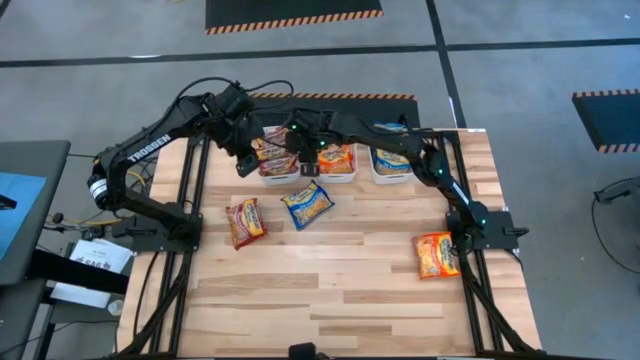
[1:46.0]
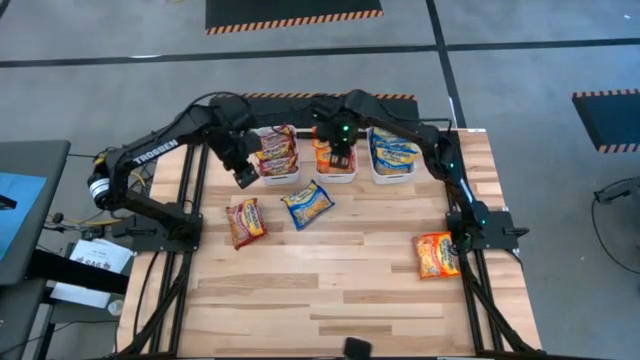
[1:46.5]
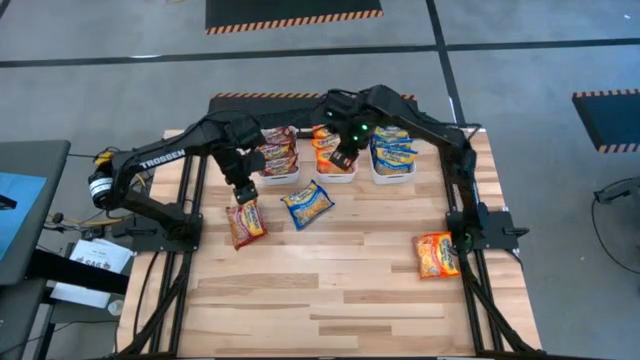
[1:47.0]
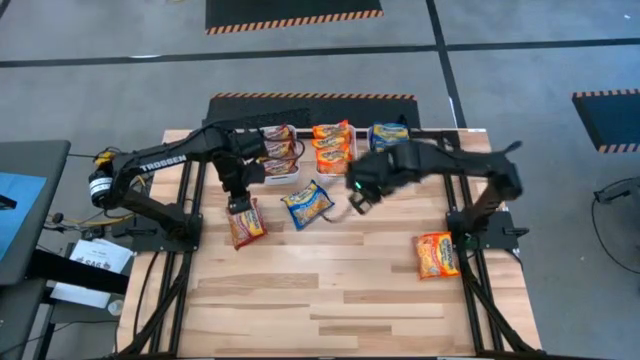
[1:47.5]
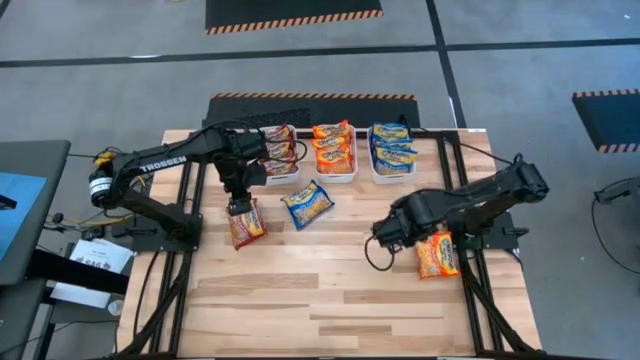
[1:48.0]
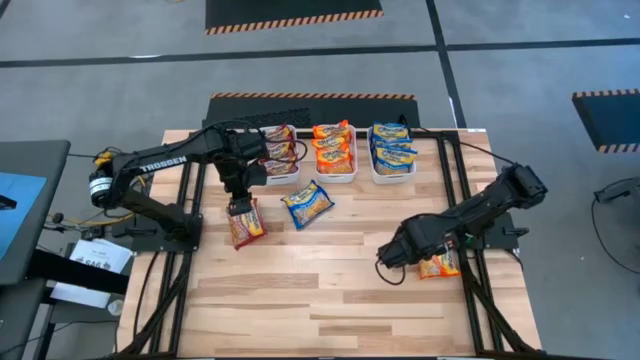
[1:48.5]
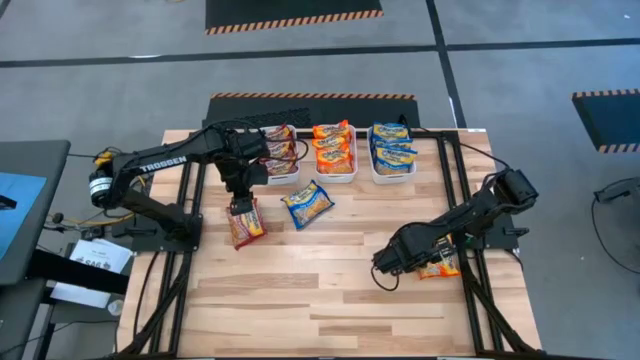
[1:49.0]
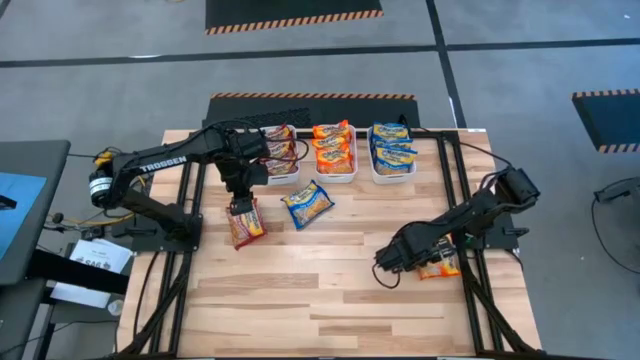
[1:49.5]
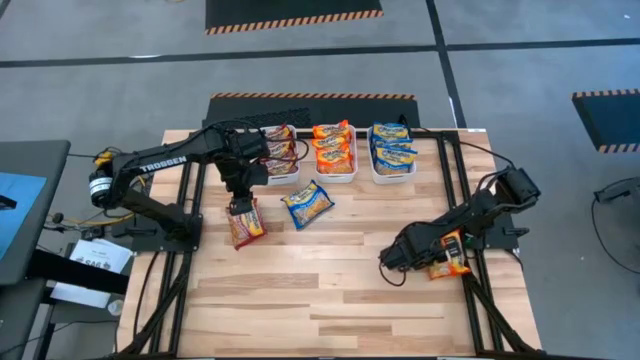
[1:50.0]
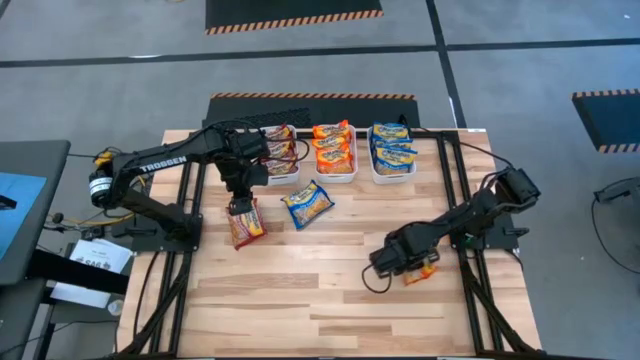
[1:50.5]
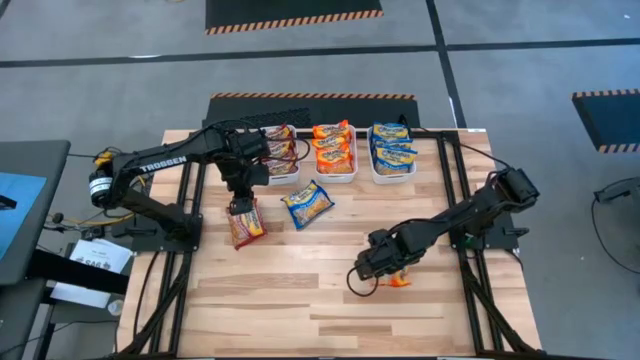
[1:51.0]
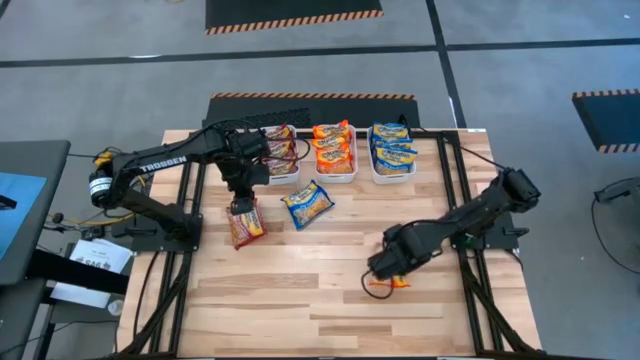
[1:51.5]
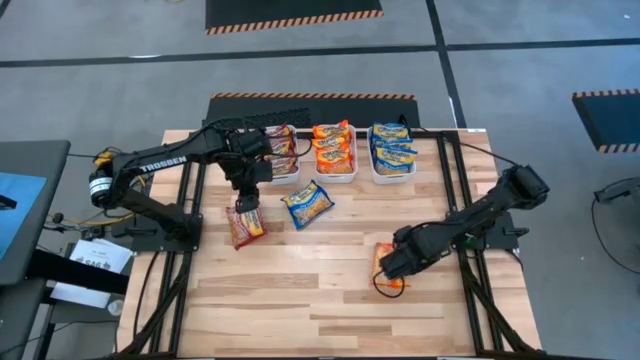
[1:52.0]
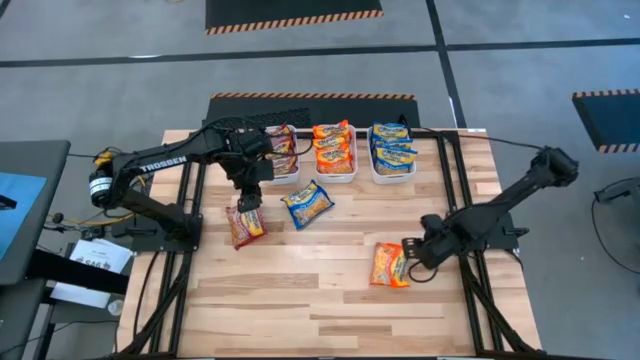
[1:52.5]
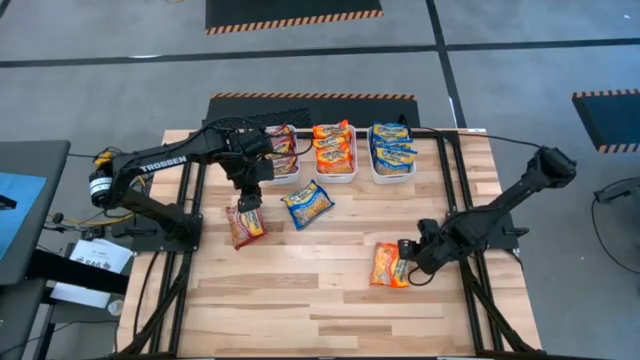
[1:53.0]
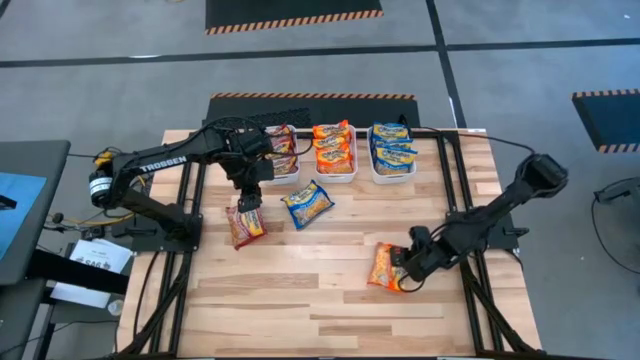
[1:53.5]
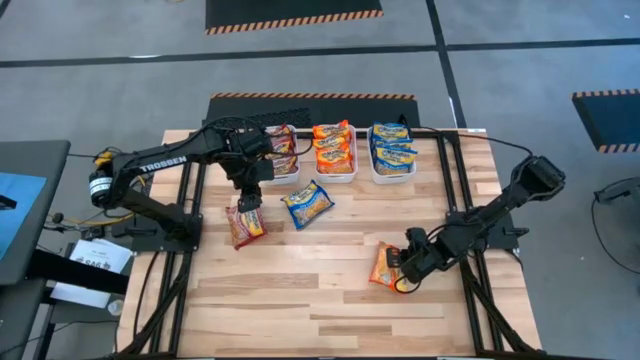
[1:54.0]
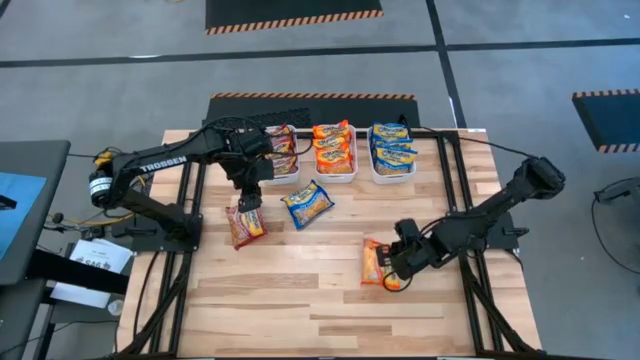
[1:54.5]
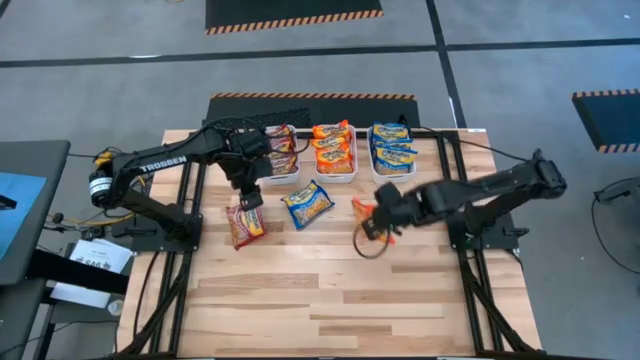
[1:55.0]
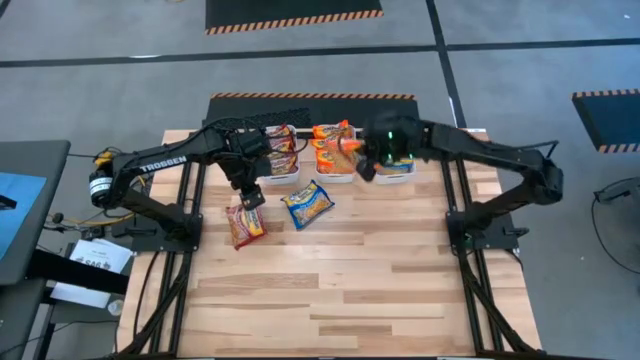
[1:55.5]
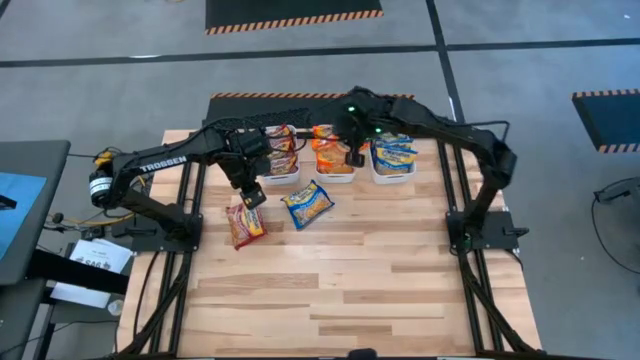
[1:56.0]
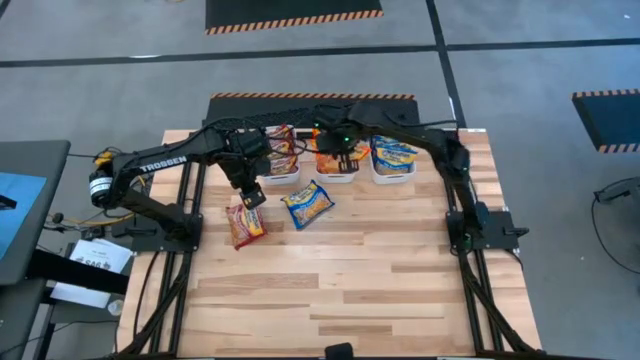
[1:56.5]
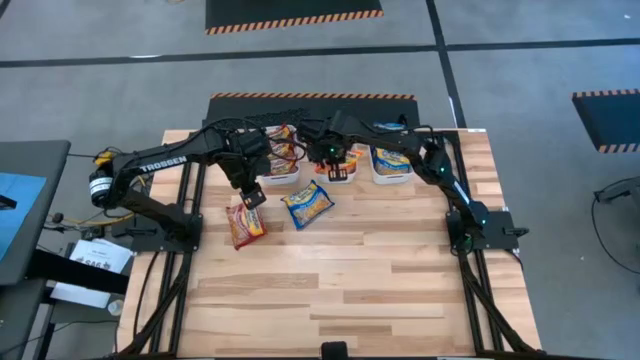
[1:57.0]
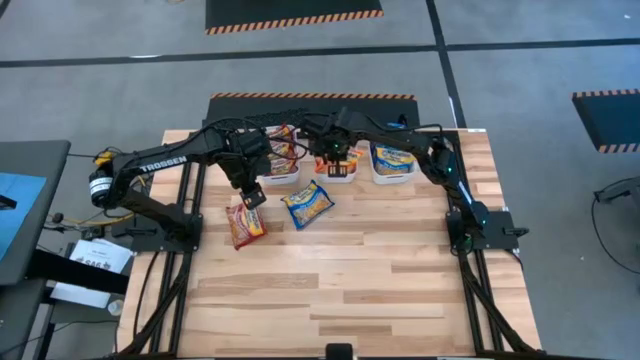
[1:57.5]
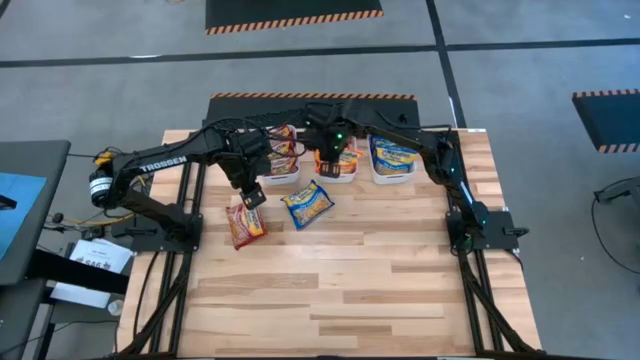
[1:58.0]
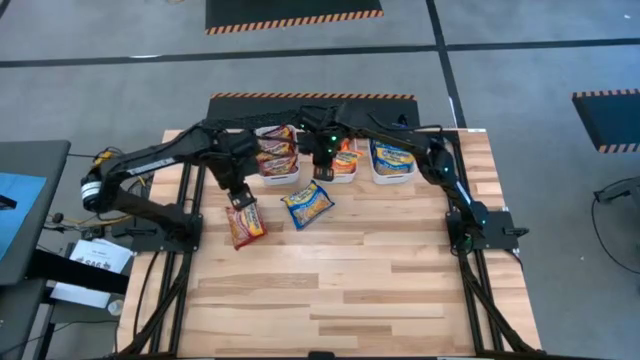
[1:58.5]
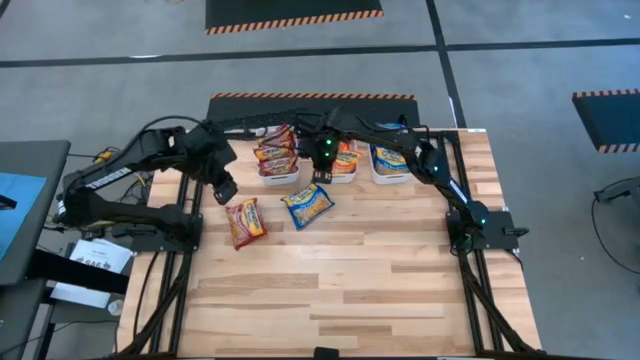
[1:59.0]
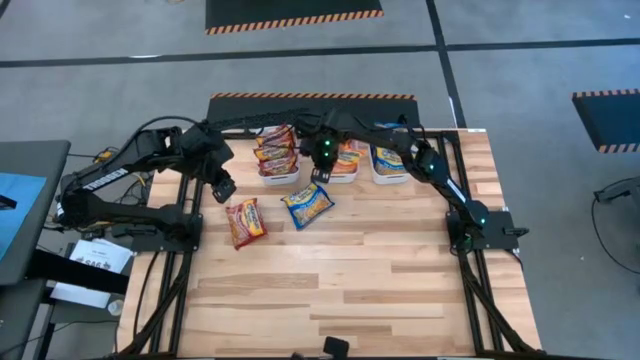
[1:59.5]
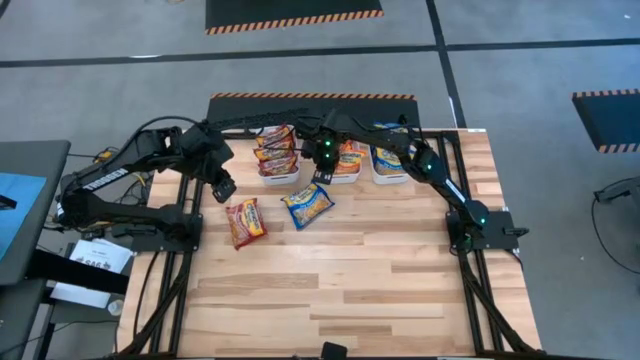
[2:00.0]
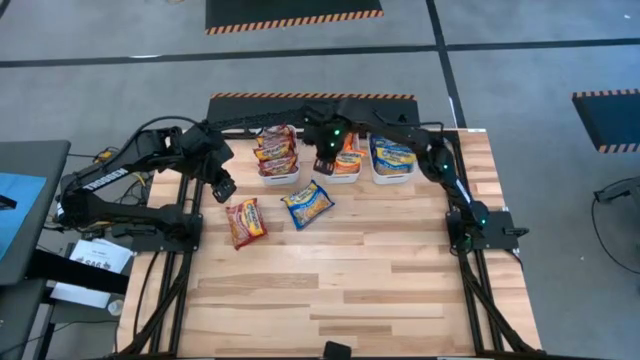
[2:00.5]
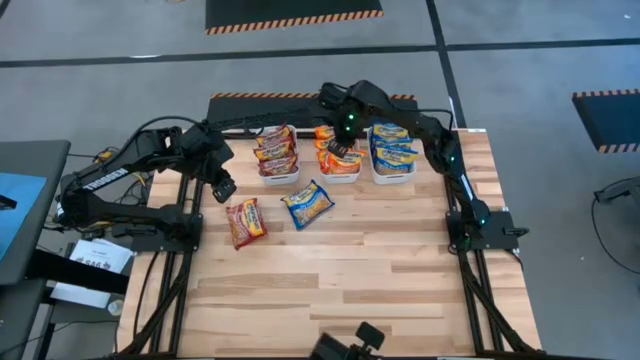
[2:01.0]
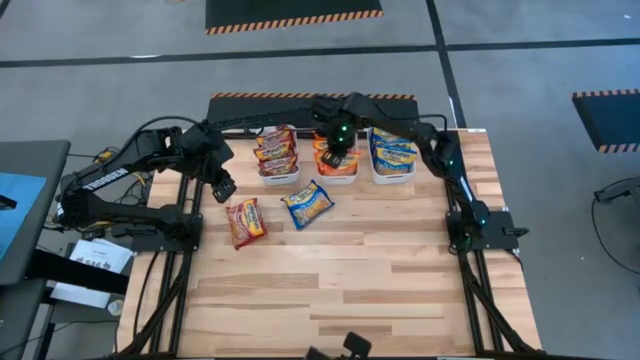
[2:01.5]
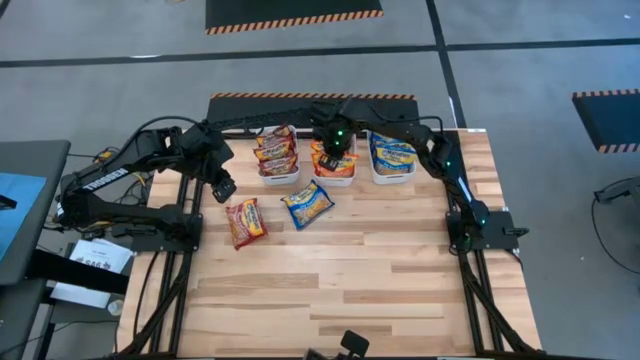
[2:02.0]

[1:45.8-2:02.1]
Task: Sort Maruchan noodles
Put the orange noodle pack into the middle white bin

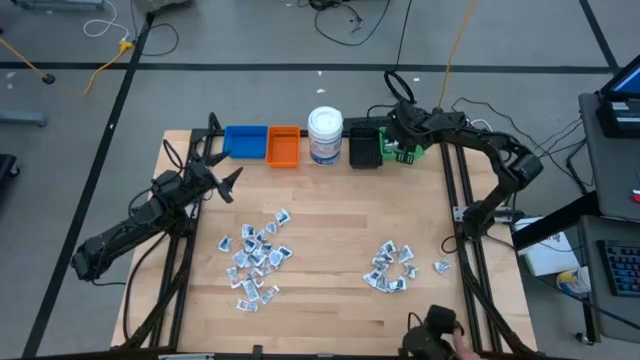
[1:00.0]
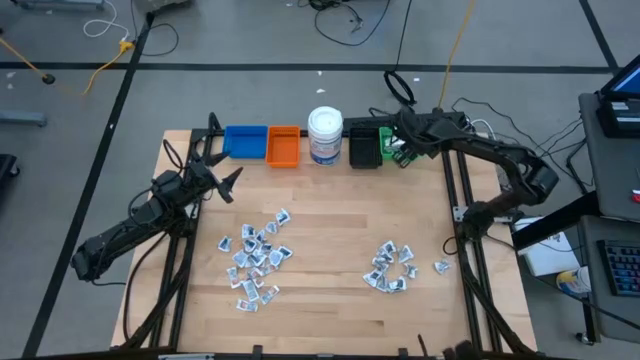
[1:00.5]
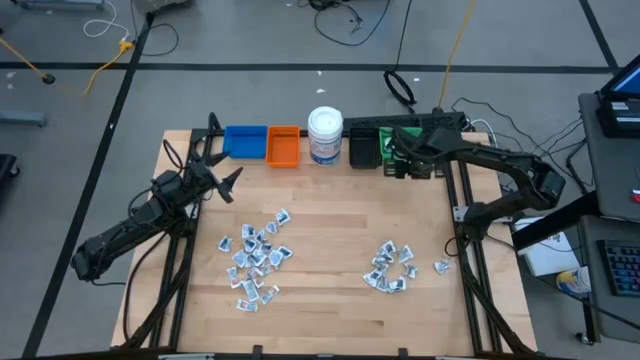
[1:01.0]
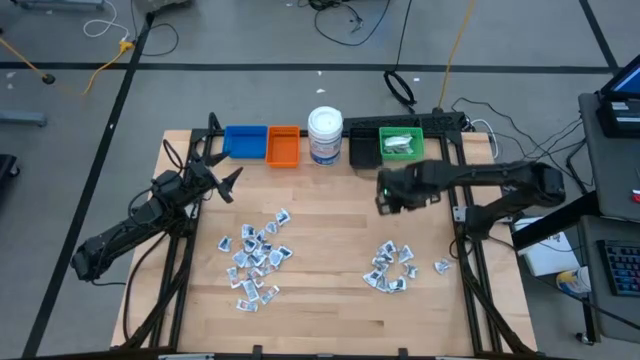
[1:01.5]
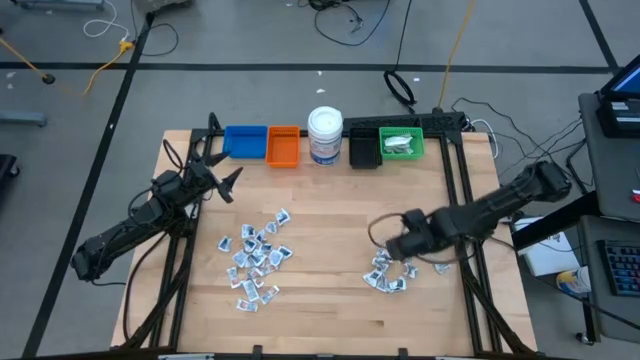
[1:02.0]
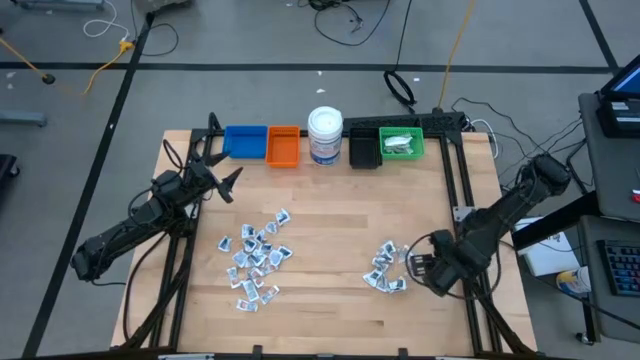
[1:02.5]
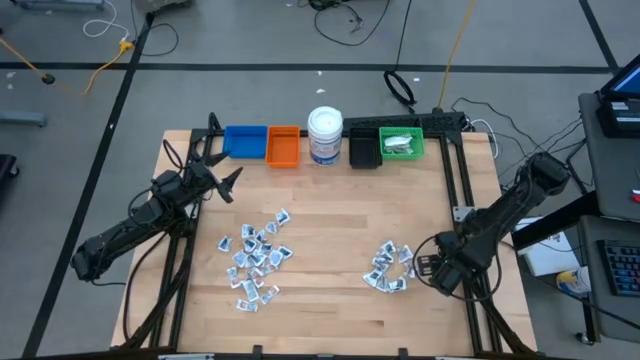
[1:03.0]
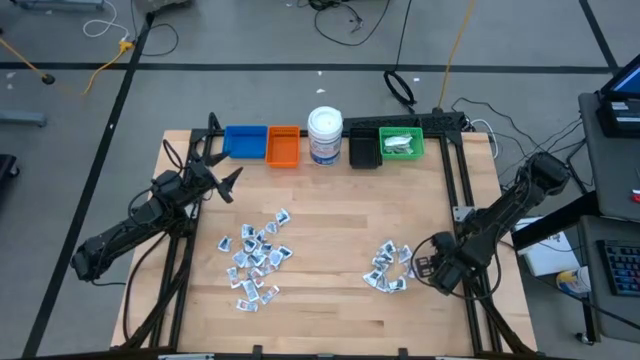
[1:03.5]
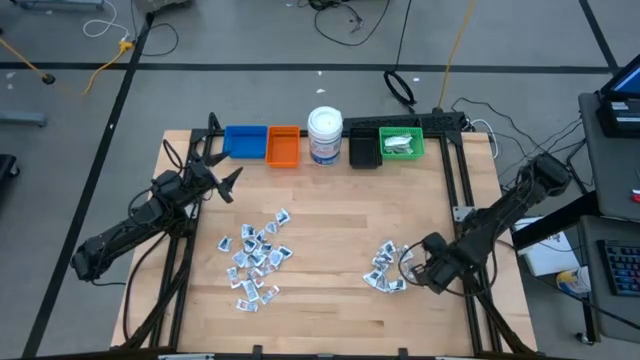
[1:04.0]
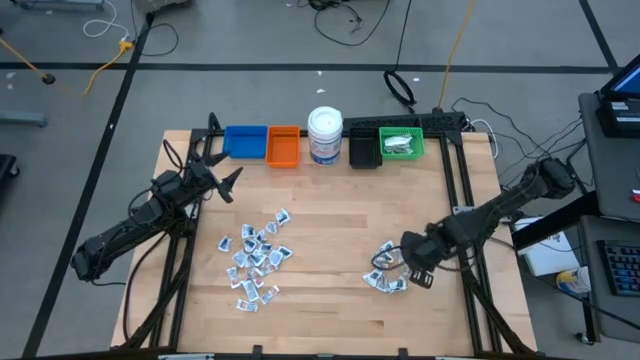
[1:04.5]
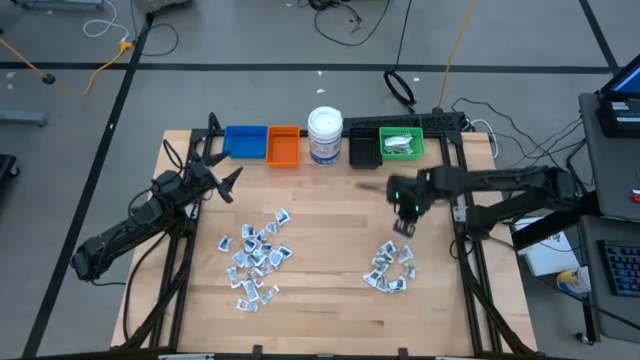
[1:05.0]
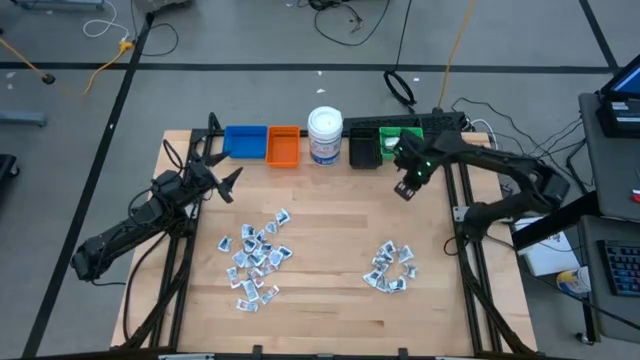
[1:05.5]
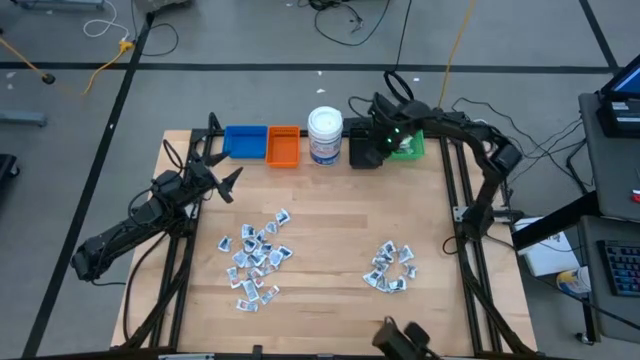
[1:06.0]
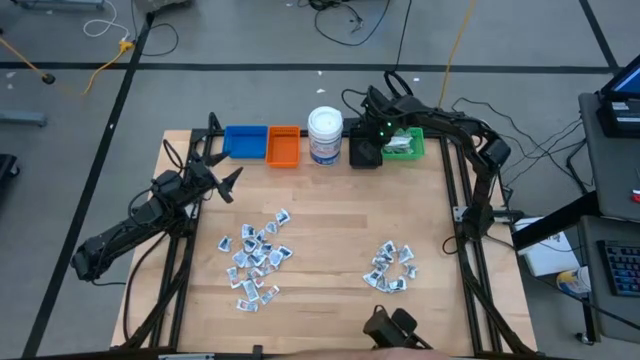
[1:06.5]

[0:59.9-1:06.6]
Task: Pick & Place First Aid Supplies
Put the towelette pack into the black bin
